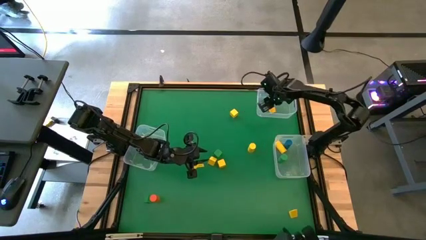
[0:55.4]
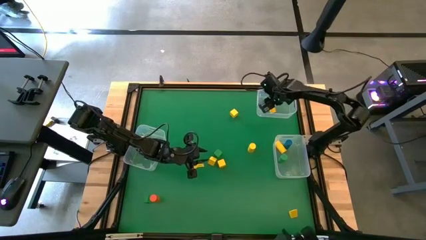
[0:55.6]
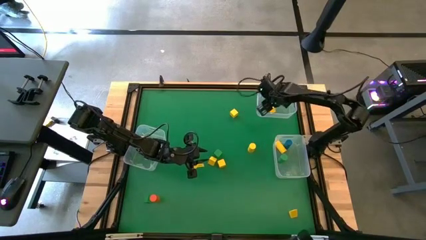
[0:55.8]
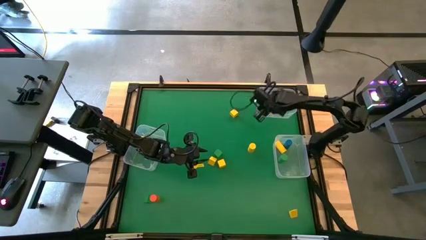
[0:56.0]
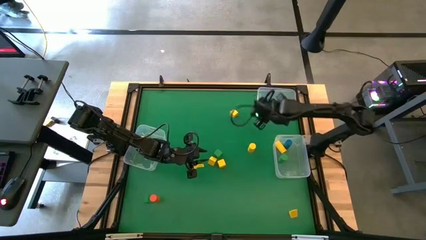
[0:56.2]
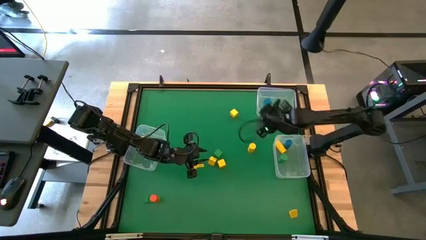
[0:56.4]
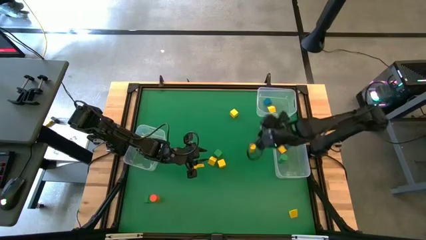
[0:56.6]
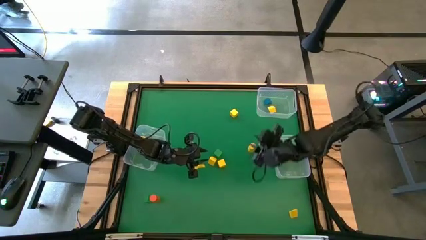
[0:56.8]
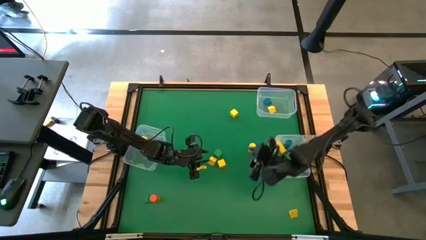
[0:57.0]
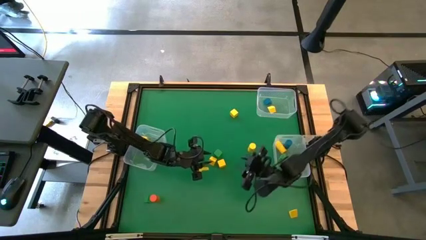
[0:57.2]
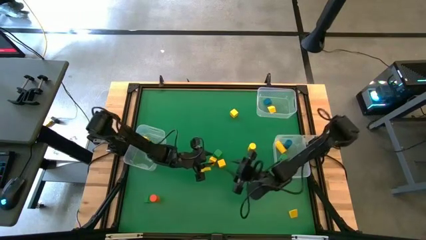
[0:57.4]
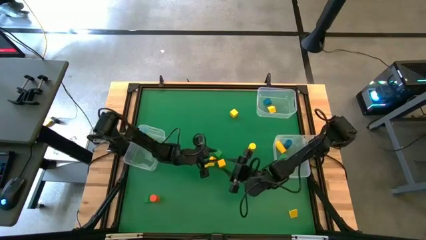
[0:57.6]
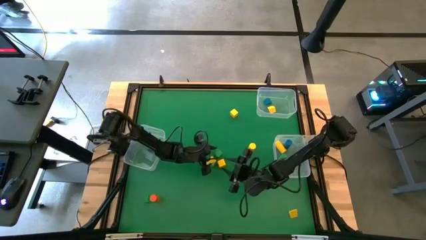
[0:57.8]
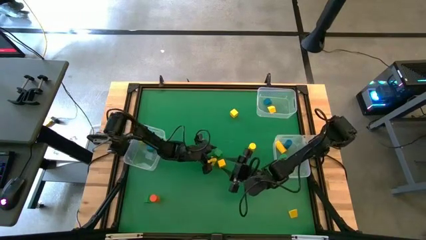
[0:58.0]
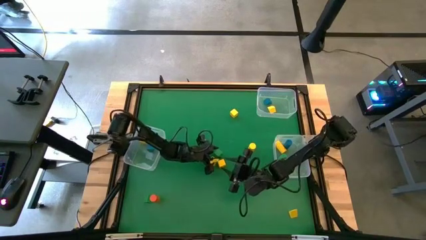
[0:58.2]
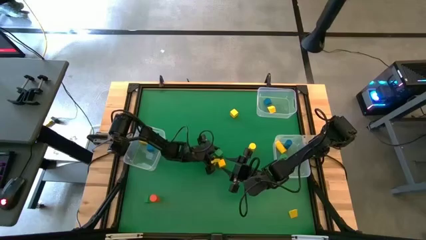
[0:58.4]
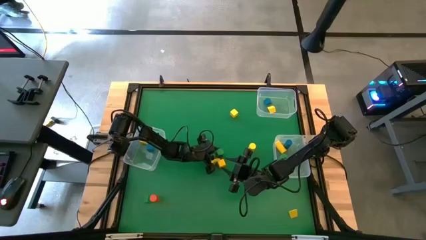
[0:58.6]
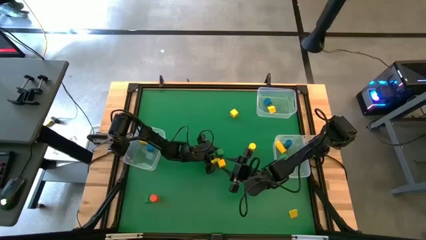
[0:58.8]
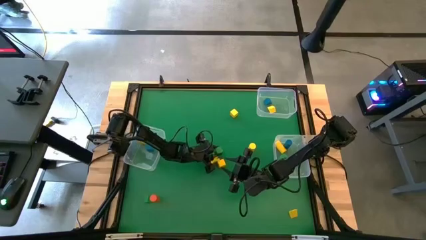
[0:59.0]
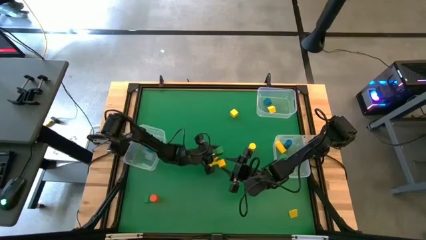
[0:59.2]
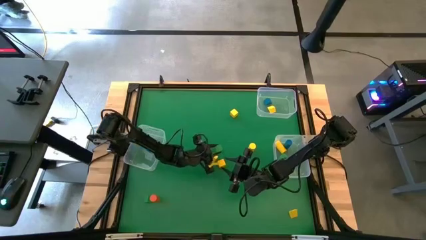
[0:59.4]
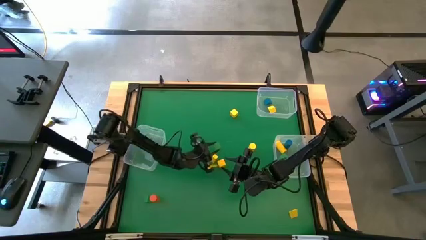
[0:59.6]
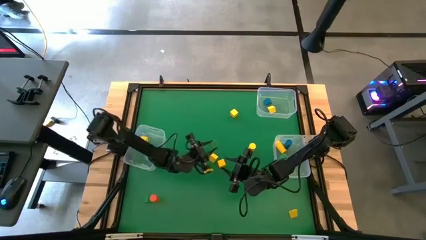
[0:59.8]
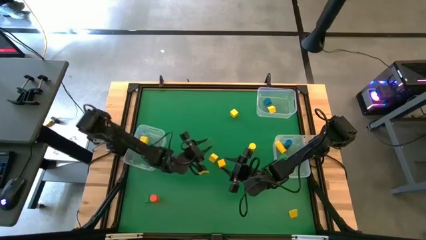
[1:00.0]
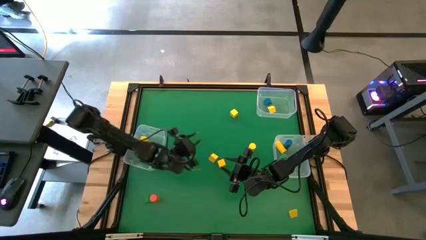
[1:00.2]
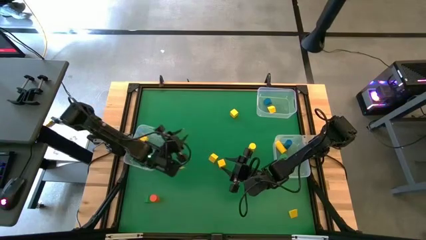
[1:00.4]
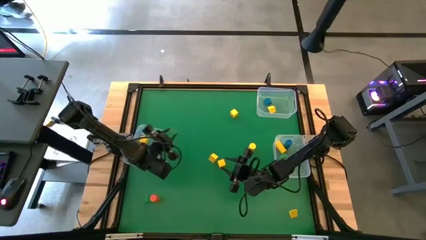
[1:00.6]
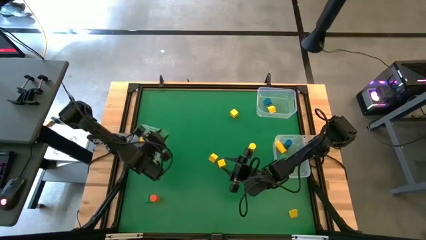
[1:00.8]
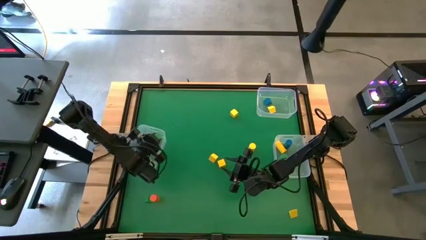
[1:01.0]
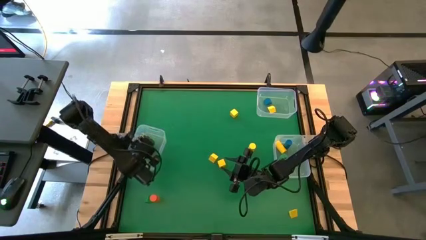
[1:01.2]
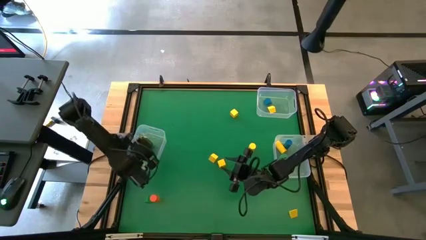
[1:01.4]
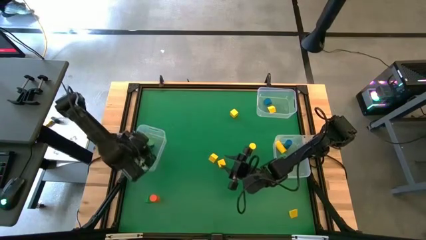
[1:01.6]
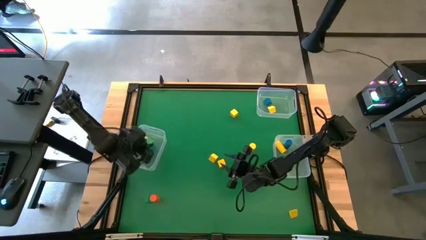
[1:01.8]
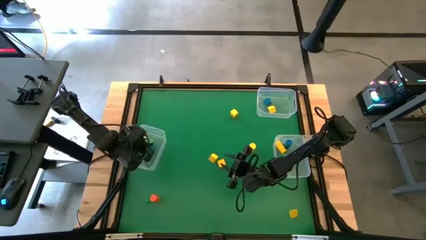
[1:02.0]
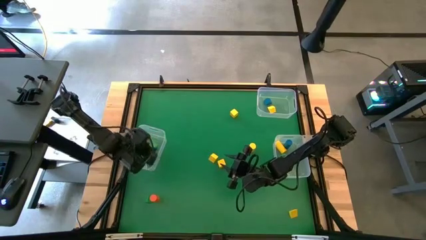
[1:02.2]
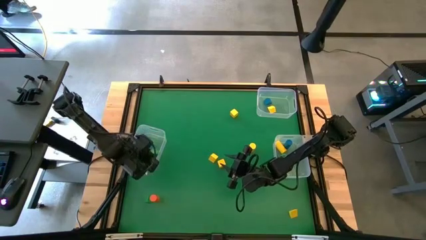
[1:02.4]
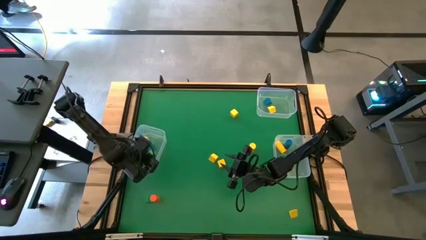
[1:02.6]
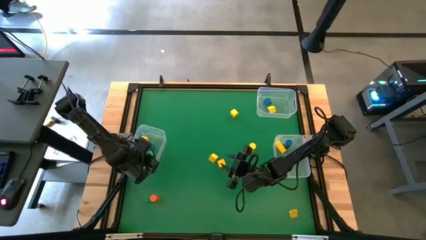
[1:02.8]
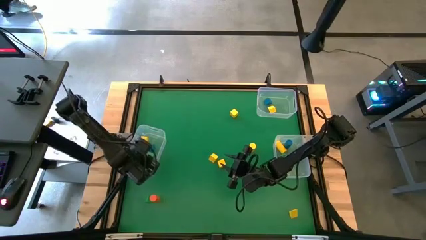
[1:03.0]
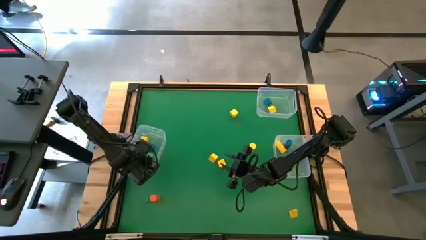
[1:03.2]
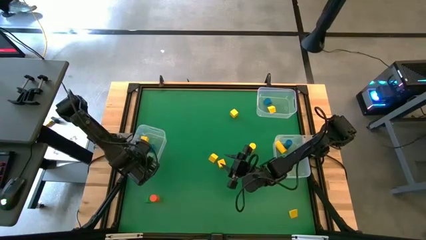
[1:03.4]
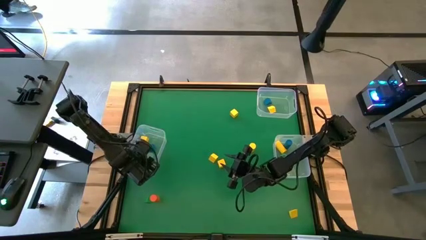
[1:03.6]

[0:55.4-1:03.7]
Task: Sort blocks by size
Put the green square block into the left transparent bin

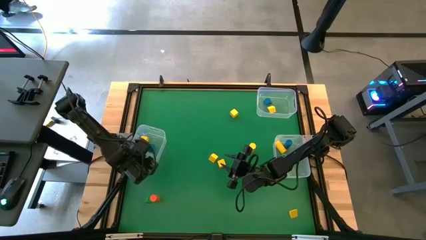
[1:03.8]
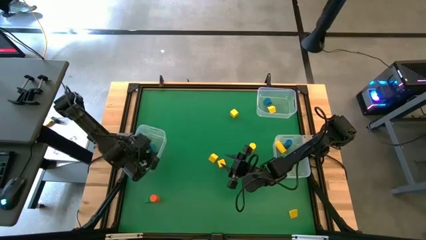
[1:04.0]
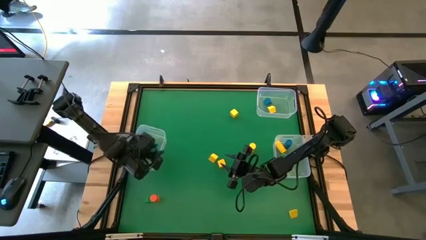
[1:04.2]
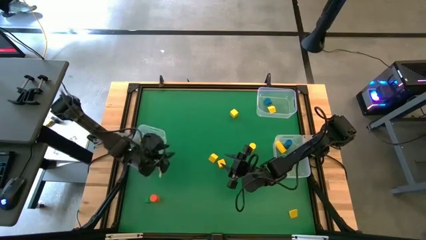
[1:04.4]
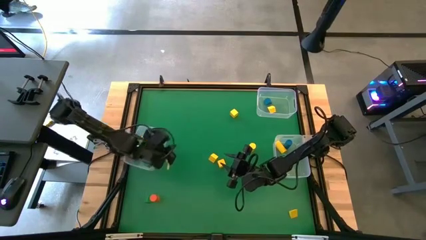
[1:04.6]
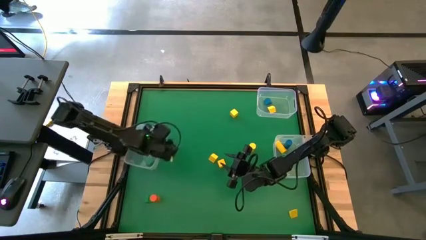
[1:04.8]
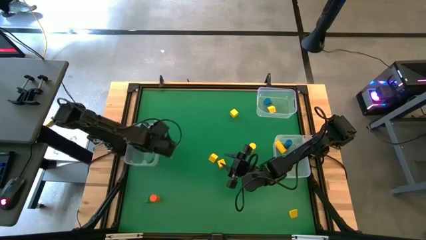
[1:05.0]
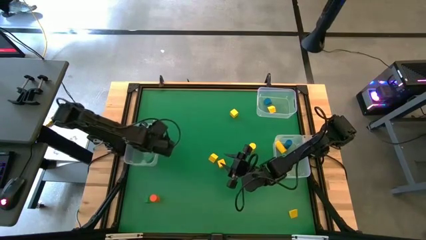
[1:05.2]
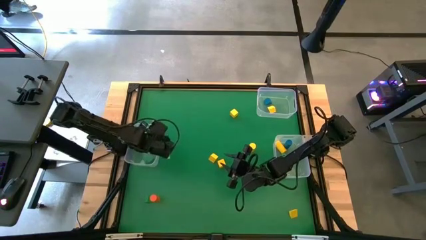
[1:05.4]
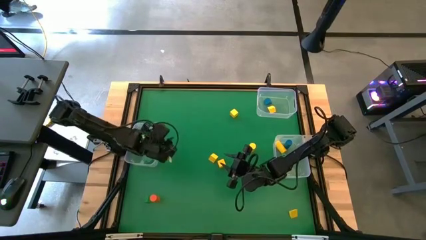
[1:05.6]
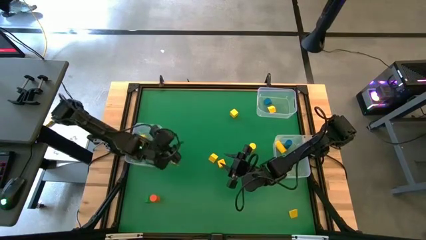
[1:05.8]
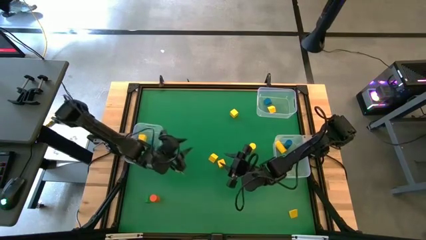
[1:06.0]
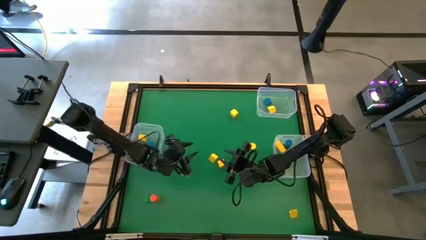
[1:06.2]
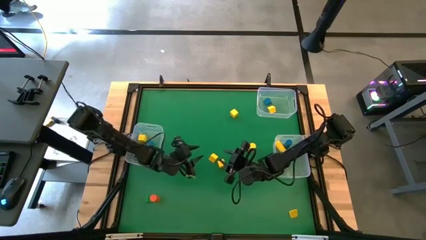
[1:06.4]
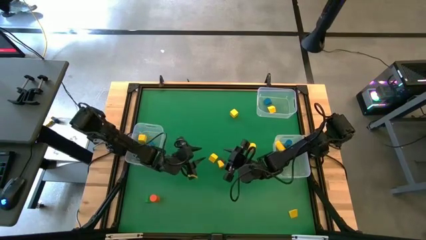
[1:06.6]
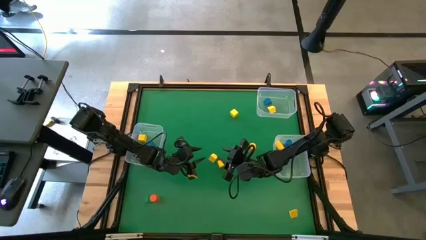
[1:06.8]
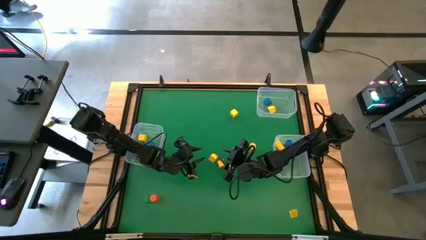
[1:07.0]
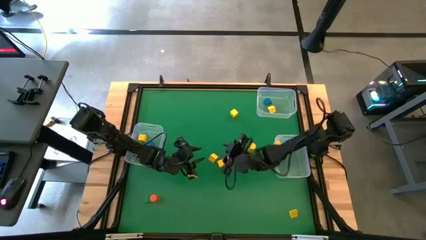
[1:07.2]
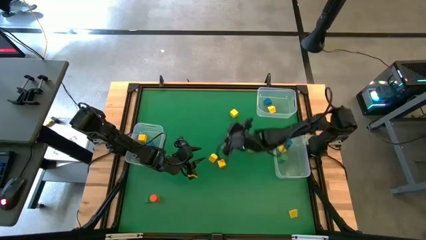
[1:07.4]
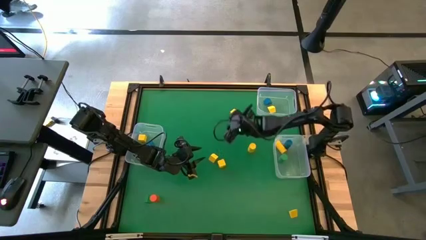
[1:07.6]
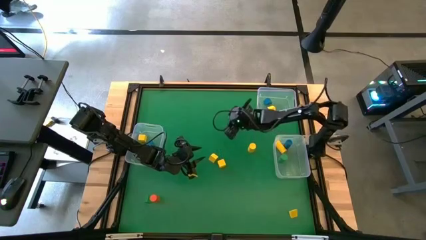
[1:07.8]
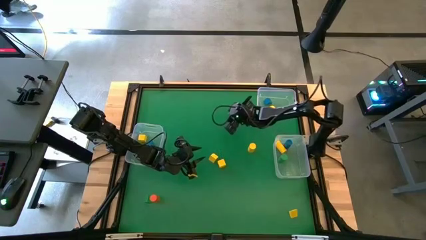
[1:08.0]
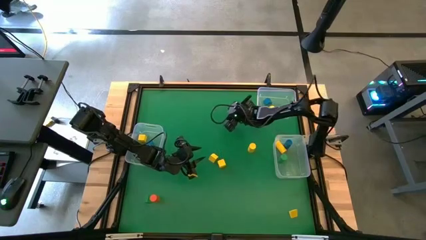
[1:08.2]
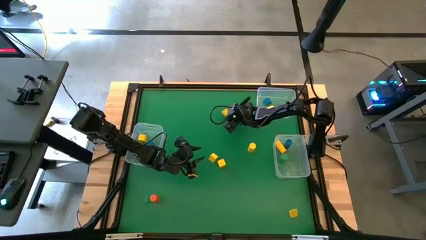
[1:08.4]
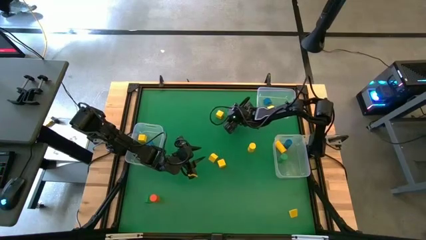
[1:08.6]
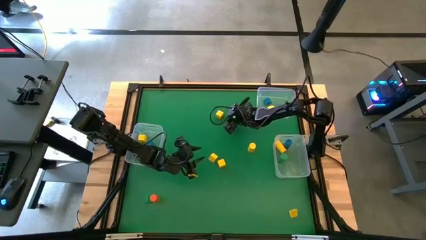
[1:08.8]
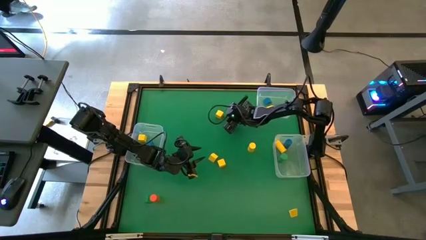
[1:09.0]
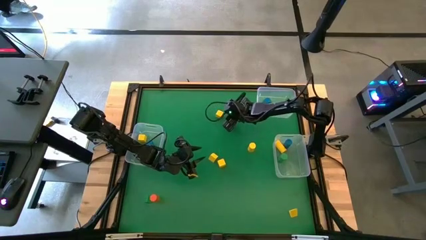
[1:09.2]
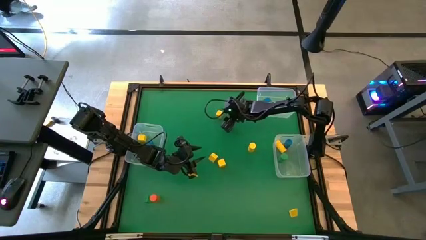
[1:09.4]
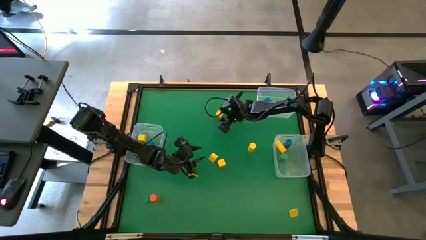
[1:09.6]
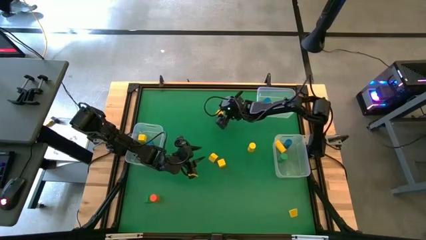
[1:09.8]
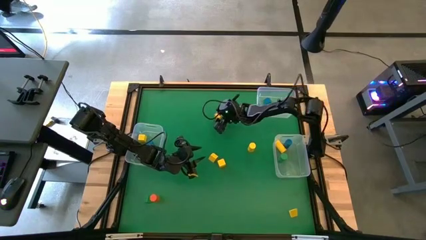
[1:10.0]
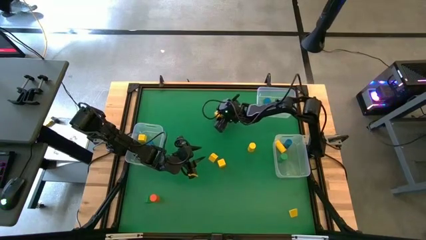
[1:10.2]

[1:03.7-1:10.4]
Put the yellow square block into the left transparent bin
